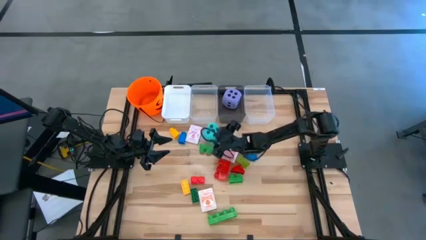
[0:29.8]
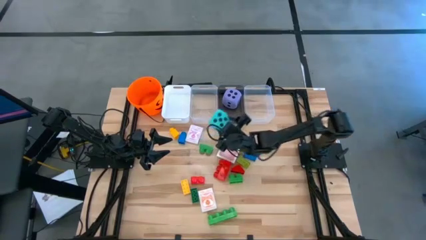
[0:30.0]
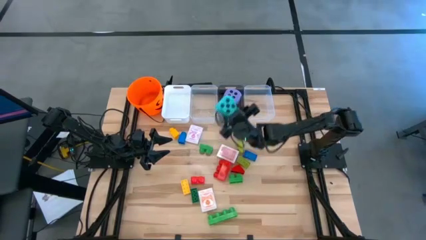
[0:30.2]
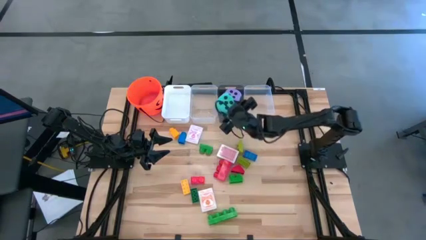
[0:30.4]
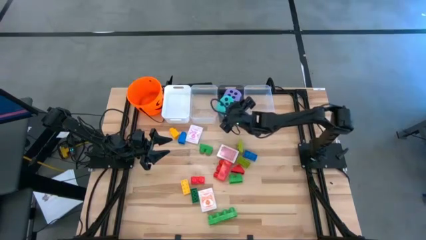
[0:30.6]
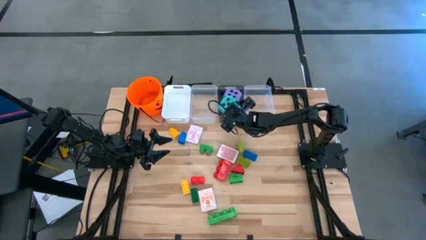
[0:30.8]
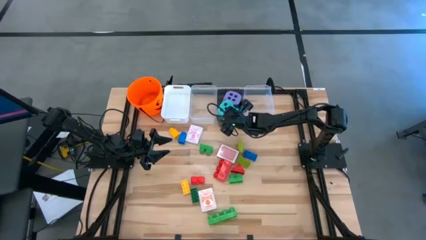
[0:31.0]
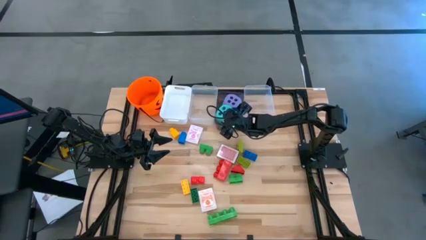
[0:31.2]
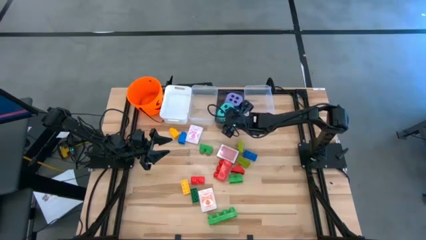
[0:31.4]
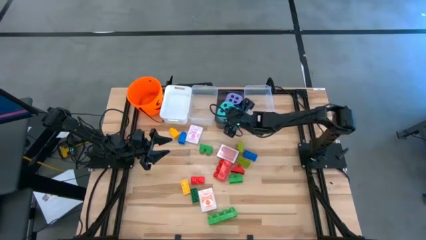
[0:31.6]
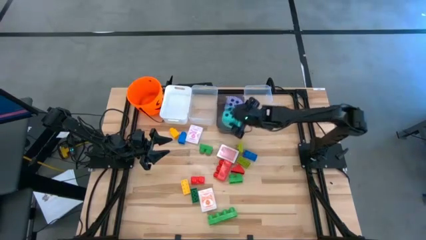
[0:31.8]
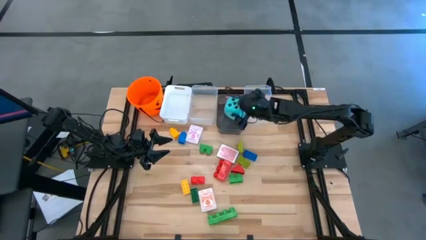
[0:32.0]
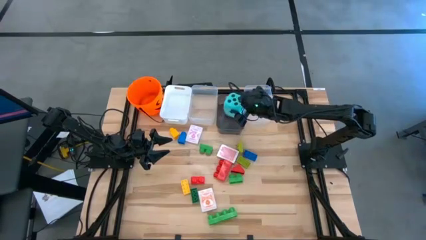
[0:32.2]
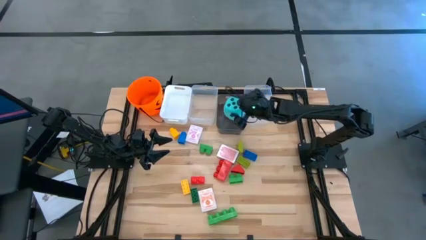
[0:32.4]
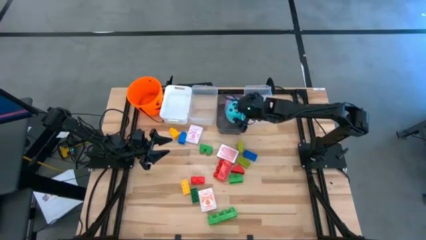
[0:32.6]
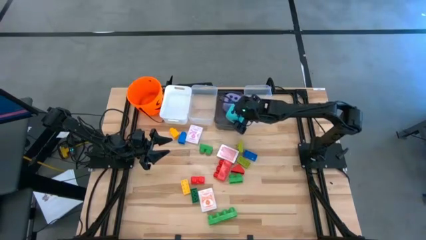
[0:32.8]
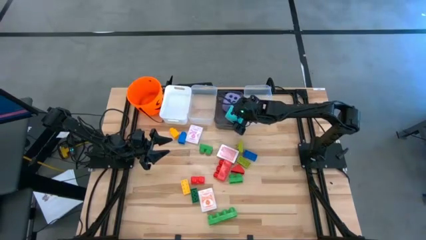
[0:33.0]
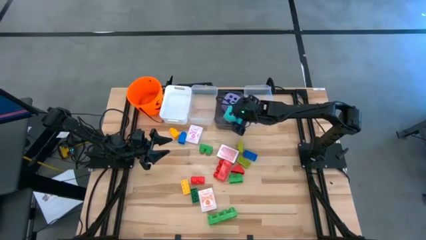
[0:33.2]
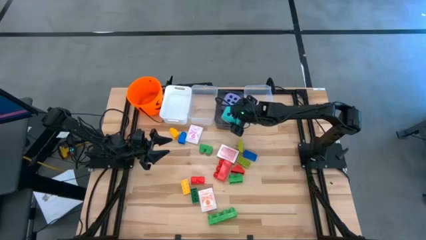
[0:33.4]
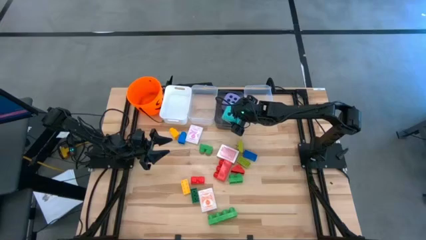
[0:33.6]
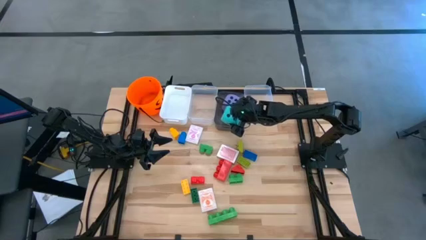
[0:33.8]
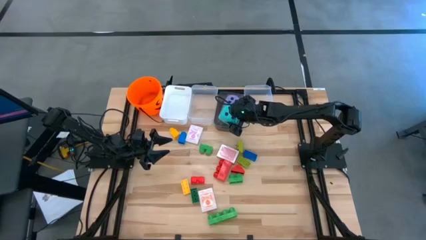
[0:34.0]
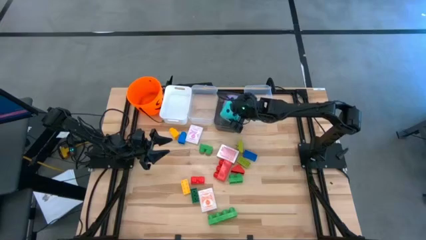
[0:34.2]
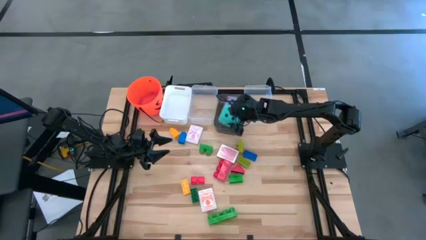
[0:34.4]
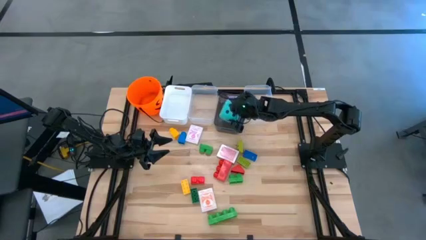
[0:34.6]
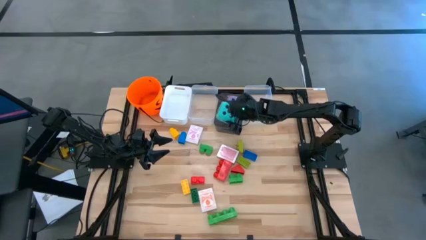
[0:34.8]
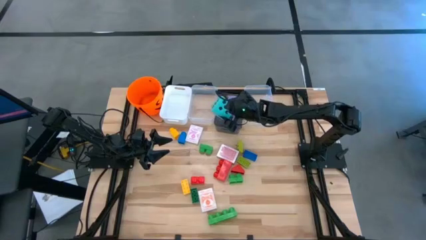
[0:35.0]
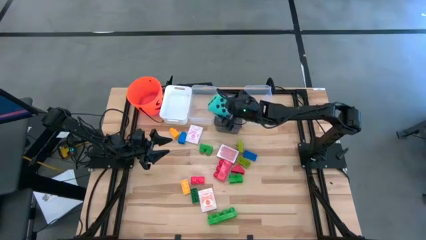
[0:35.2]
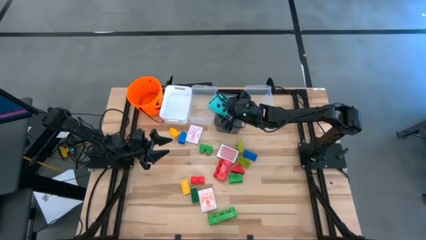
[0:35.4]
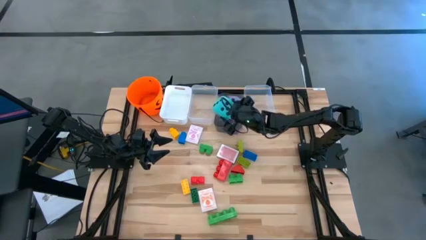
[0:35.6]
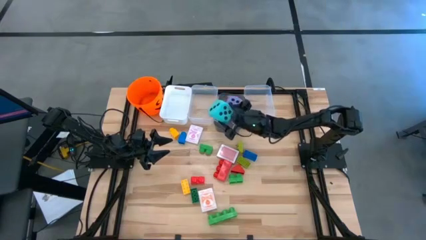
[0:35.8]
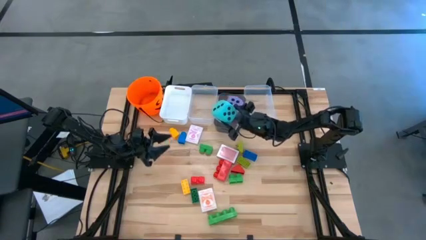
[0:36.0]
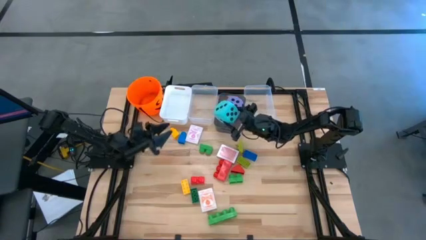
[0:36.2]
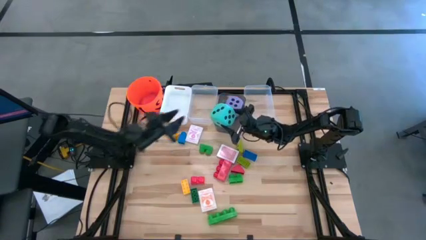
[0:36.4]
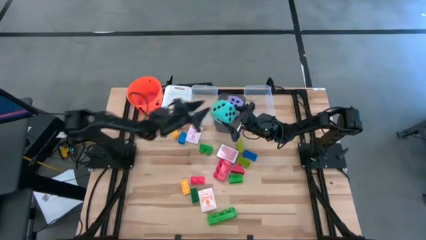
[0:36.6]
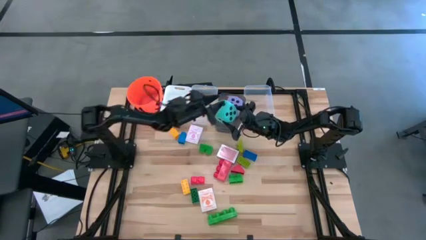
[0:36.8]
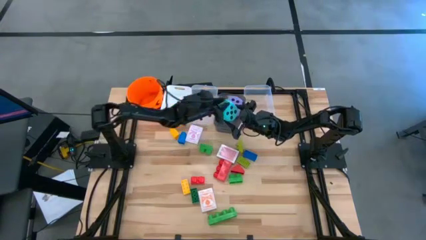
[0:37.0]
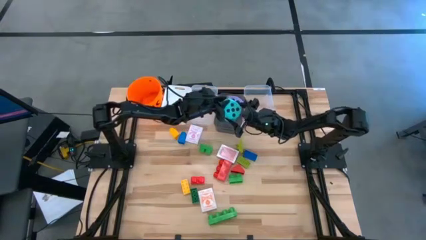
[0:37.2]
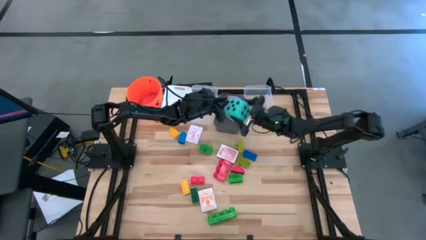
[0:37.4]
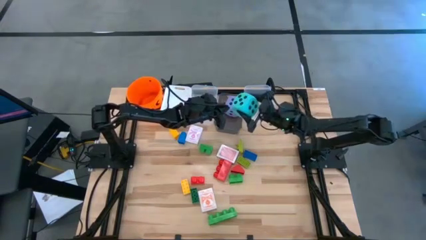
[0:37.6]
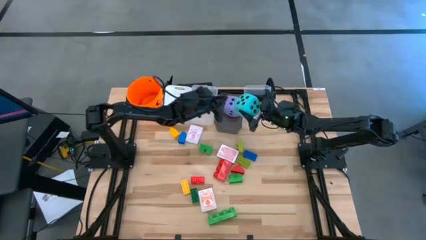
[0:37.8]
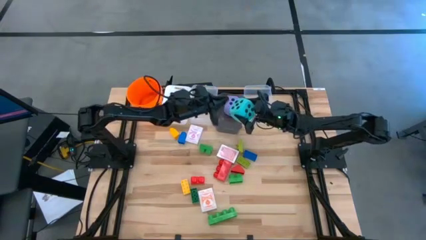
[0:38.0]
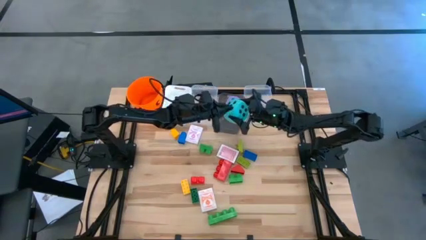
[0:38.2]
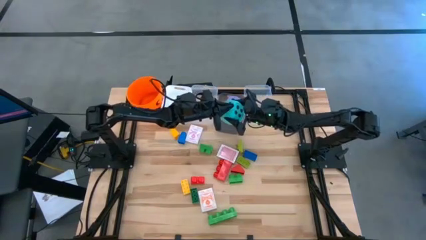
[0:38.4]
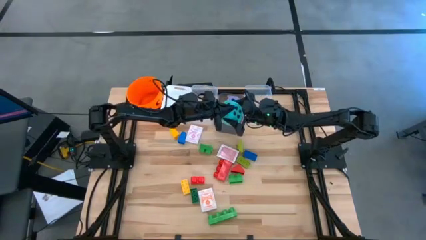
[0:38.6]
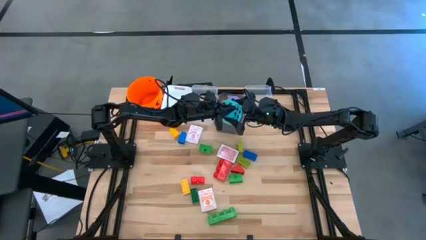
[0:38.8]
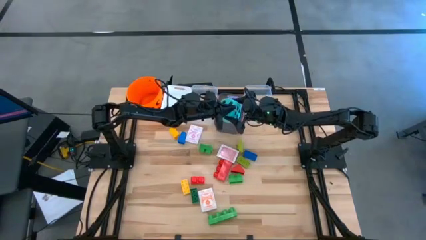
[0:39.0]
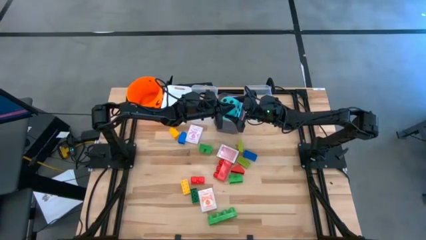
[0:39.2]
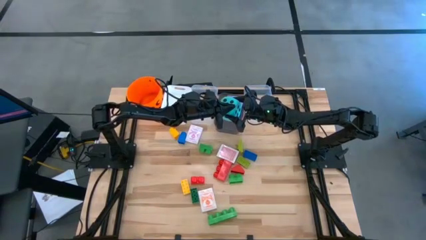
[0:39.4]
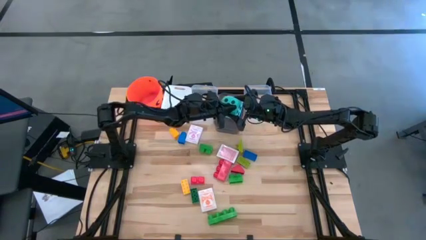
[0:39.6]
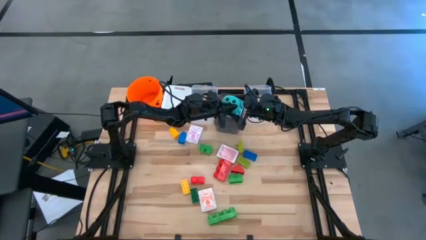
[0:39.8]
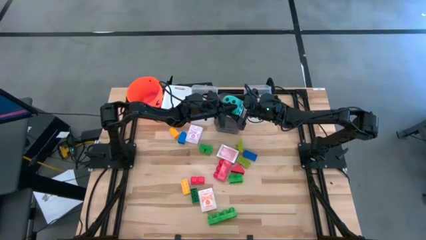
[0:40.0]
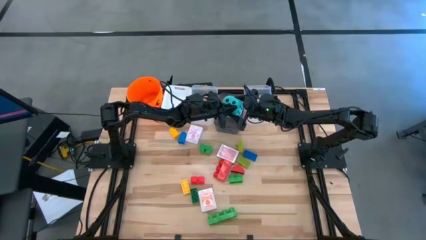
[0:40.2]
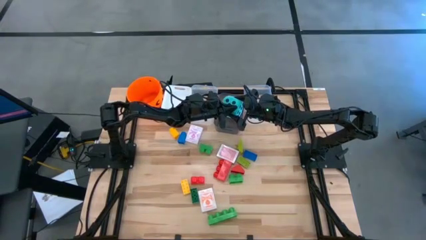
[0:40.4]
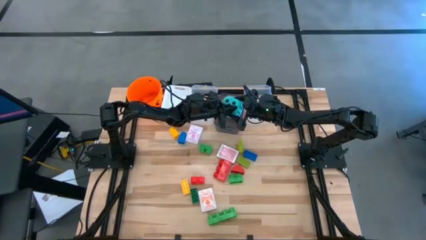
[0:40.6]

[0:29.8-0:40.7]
Task: Pick & Place Toys
Put the green die into the black bin

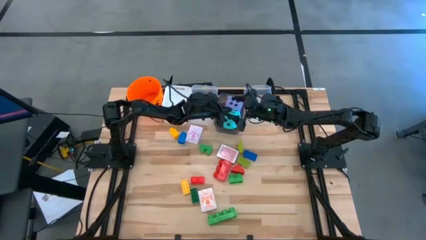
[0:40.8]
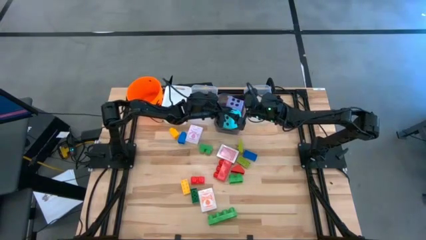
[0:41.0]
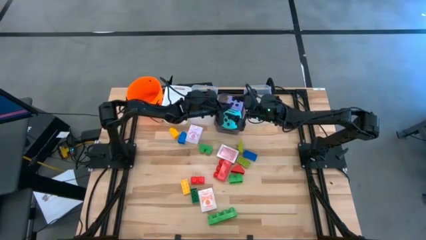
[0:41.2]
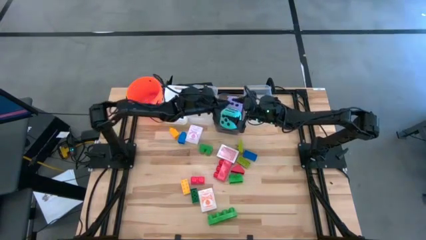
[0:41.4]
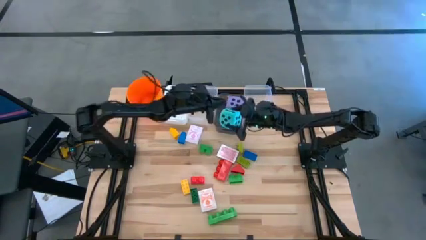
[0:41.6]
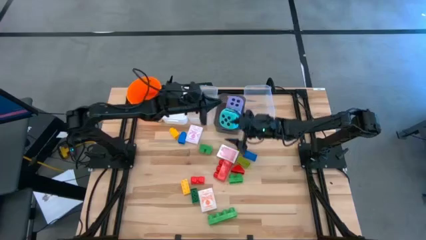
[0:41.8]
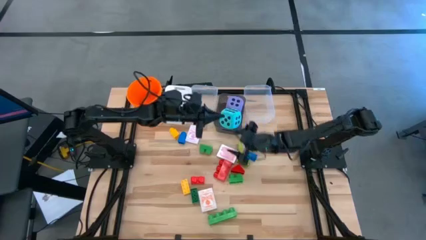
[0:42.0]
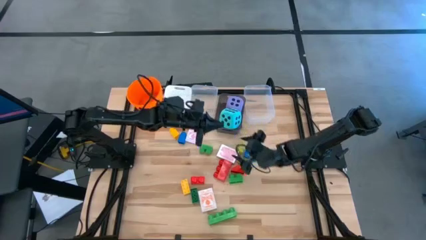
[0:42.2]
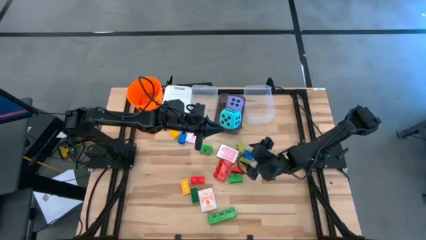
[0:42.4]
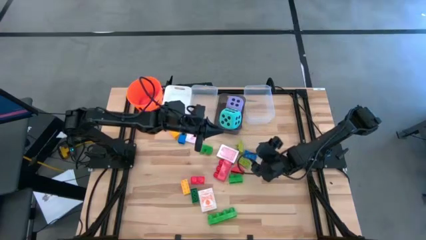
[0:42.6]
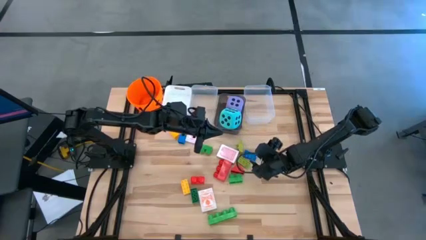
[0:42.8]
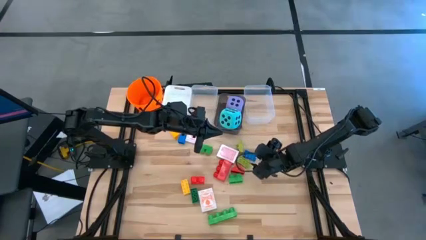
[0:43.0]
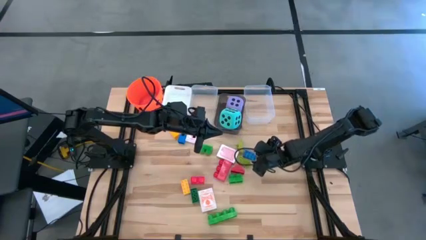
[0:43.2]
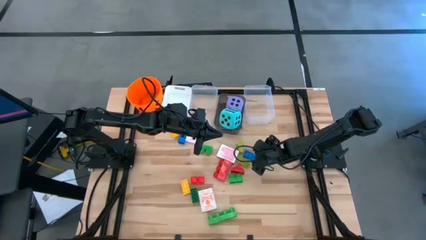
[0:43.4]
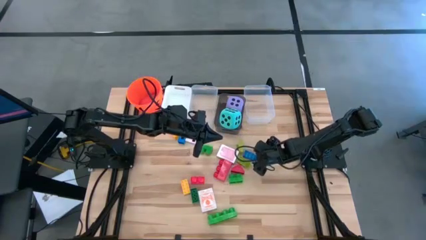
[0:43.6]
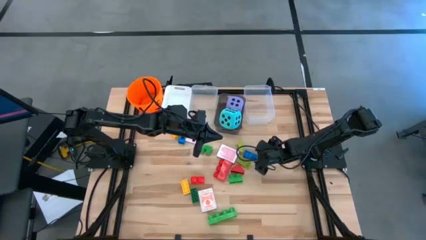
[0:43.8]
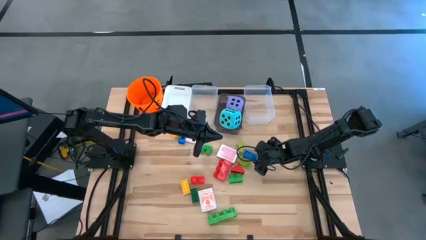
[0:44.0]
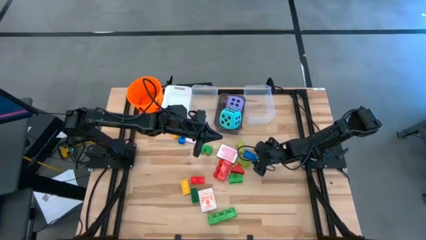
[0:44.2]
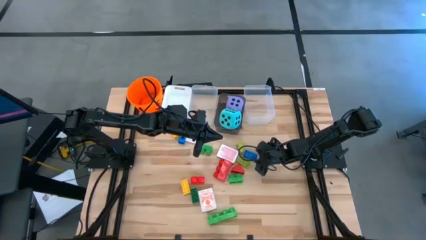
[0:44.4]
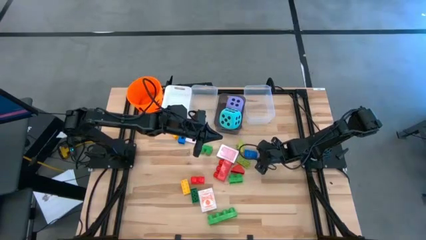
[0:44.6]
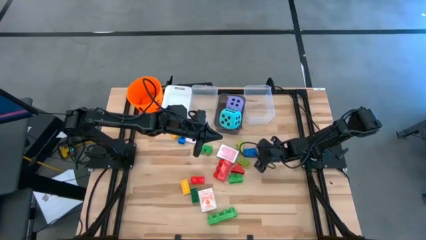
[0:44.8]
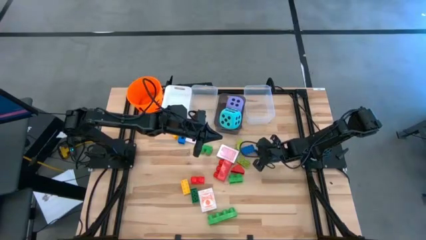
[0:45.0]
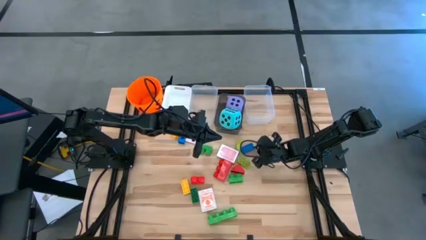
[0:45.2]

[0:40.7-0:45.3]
Put the small blue game piece into the right transparent bin

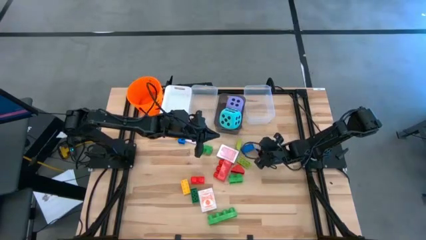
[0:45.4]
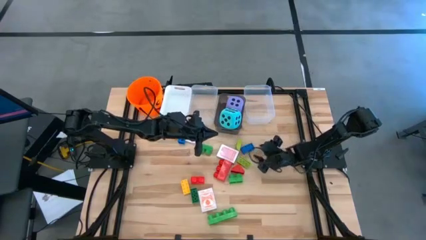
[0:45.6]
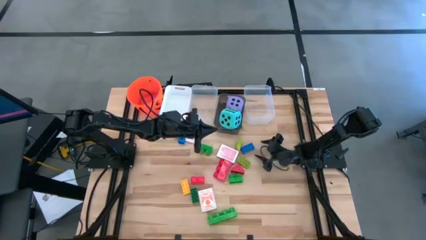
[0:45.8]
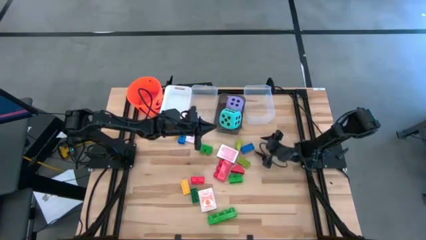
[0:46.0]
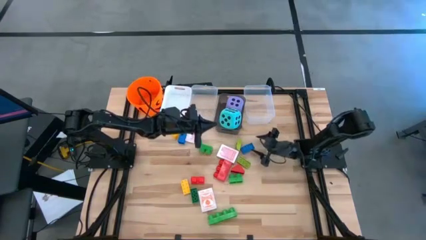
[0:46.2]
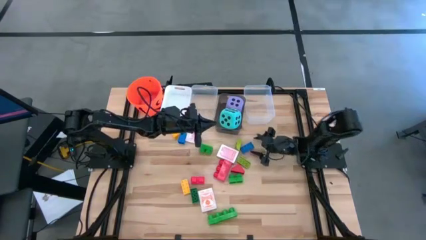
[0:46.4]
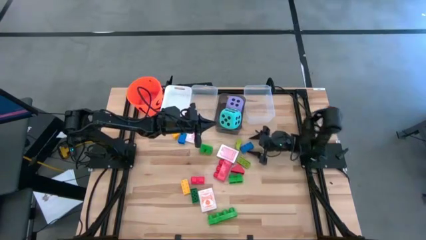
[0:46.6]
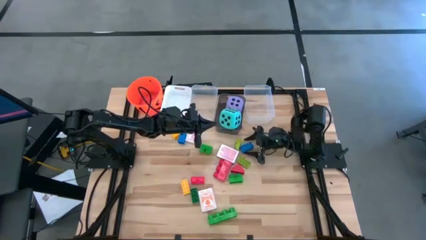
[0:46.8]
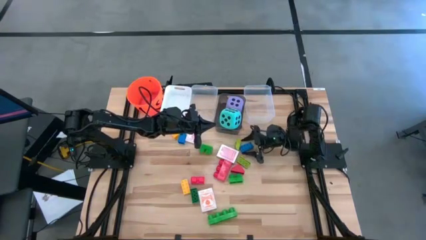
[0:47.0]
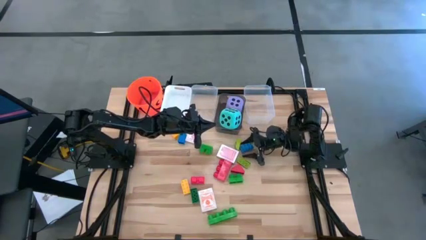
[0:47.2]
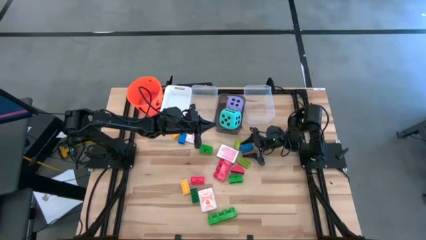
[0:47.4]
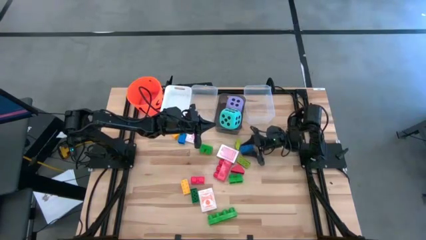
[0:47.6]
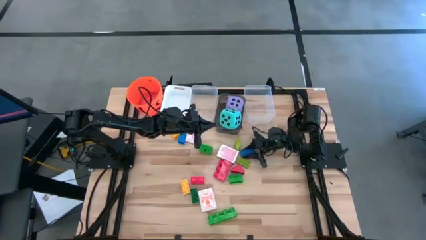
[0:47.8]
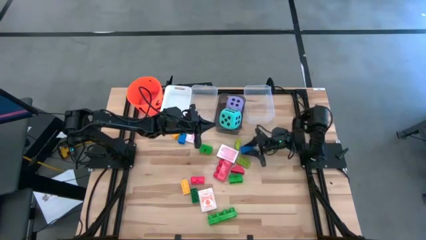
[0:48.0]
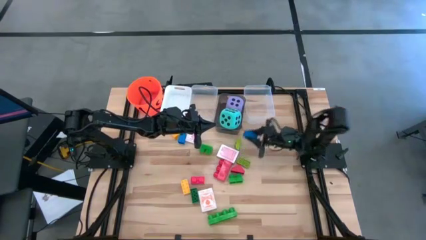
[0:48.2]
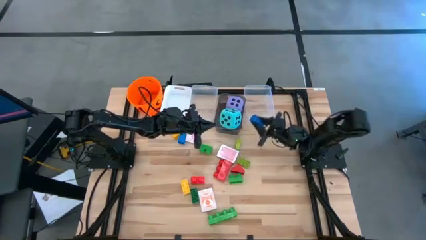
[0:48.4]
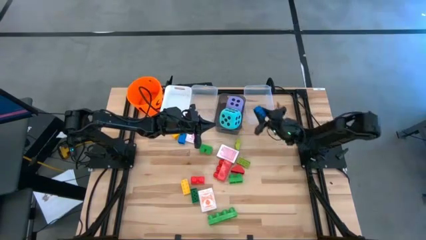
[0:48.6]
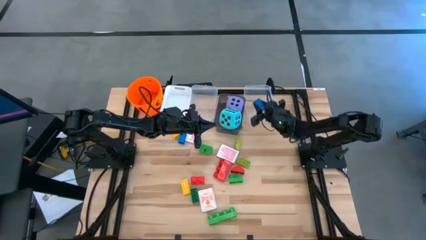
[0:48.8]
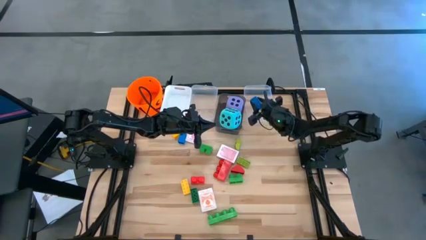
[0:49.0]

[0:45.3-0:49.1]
Put the small blue game piece into the right transparent bin
